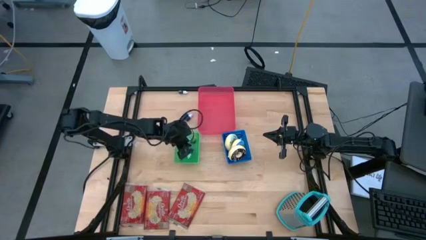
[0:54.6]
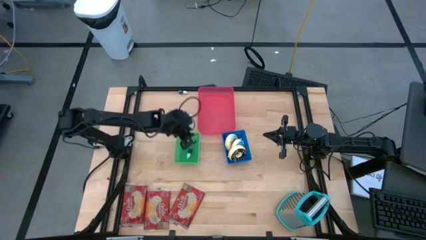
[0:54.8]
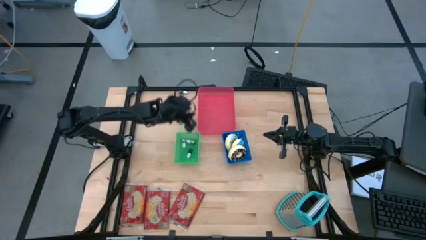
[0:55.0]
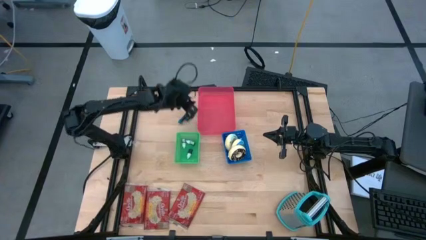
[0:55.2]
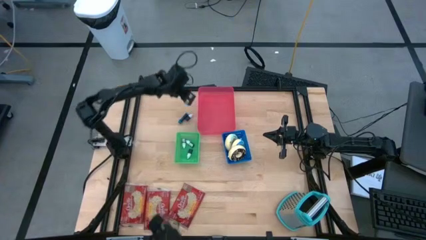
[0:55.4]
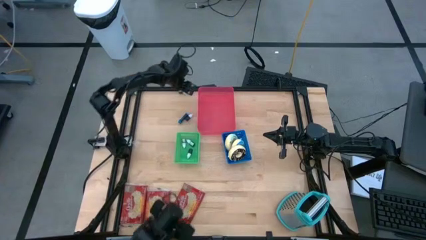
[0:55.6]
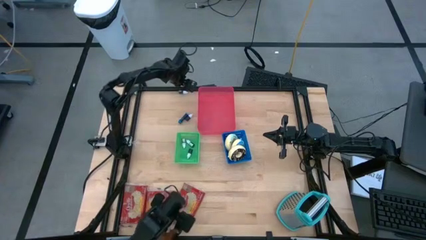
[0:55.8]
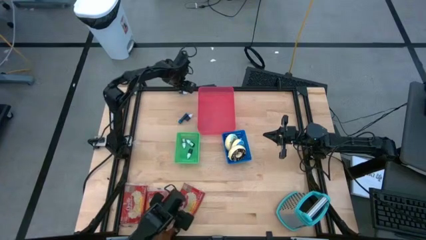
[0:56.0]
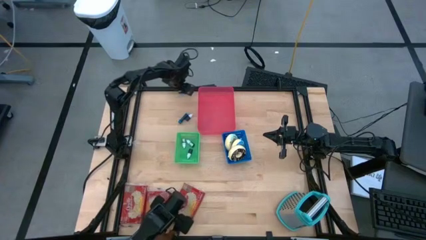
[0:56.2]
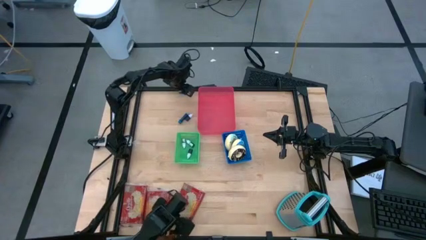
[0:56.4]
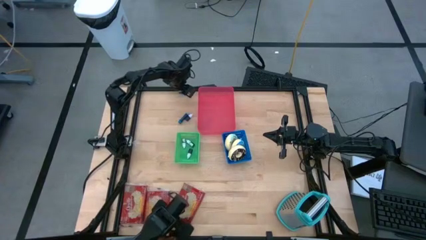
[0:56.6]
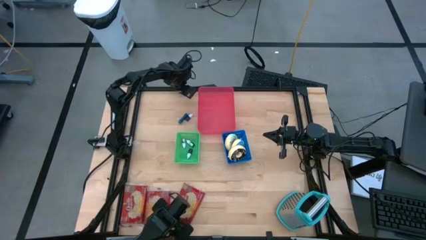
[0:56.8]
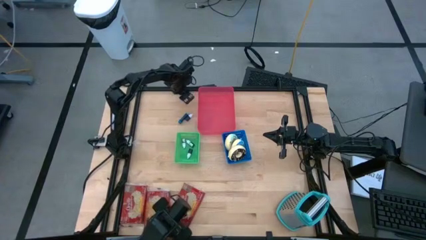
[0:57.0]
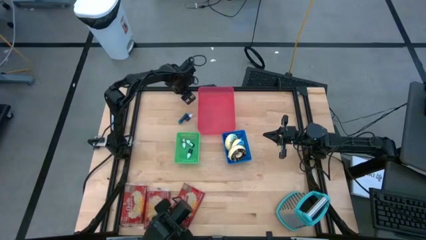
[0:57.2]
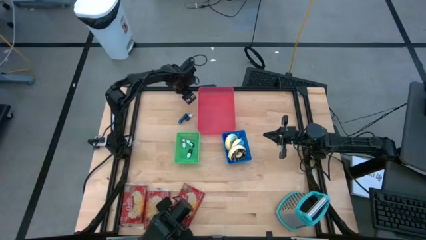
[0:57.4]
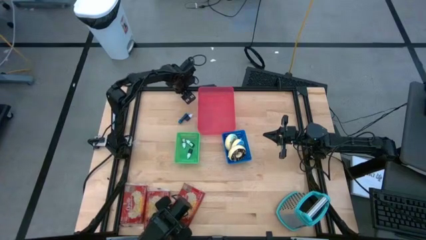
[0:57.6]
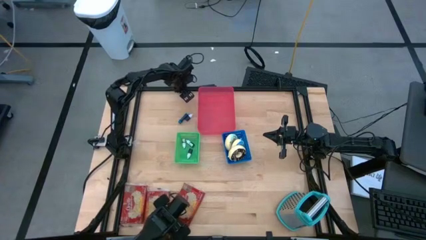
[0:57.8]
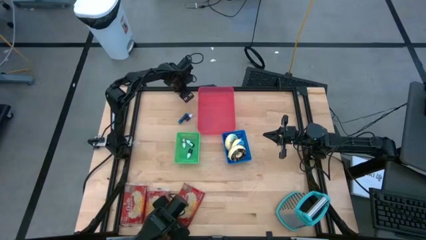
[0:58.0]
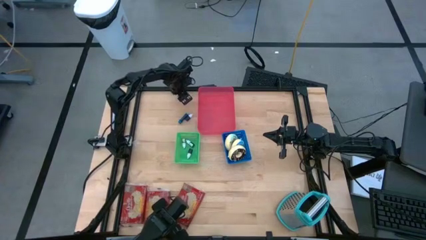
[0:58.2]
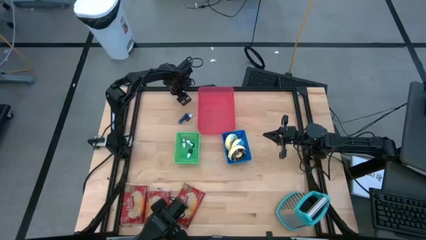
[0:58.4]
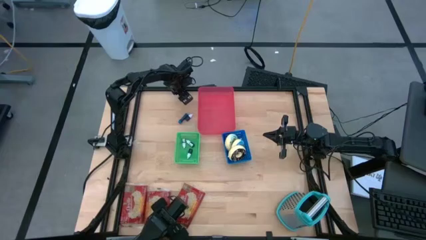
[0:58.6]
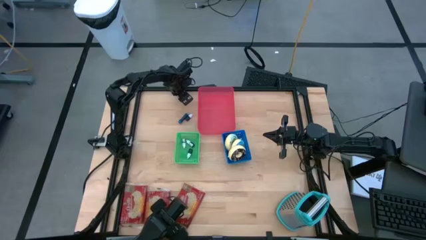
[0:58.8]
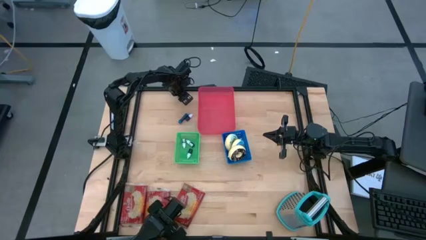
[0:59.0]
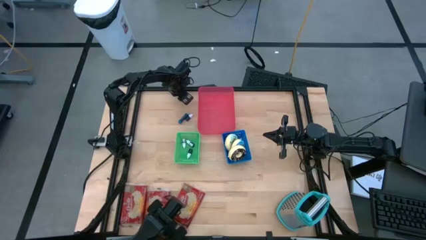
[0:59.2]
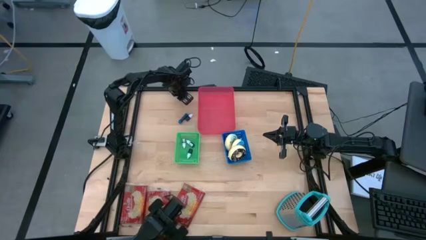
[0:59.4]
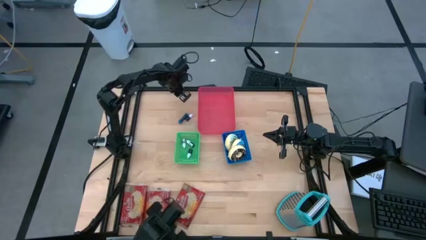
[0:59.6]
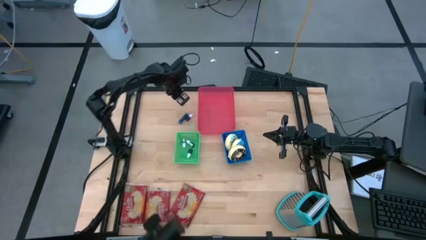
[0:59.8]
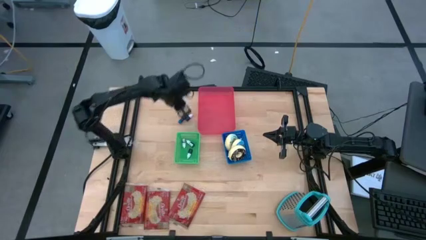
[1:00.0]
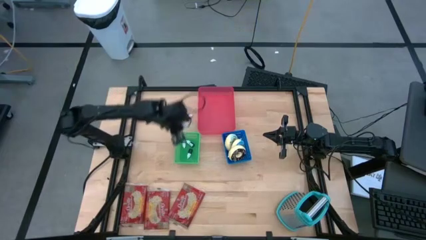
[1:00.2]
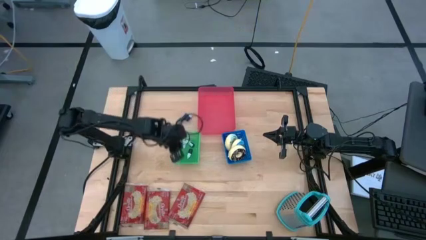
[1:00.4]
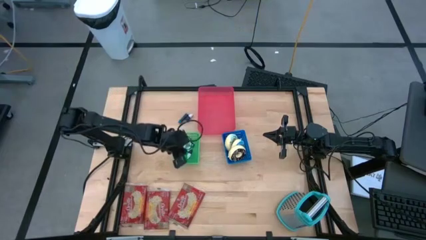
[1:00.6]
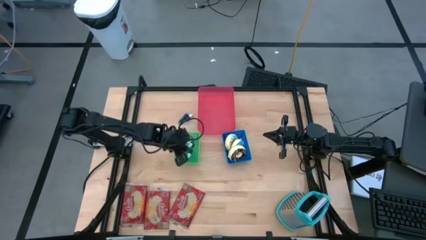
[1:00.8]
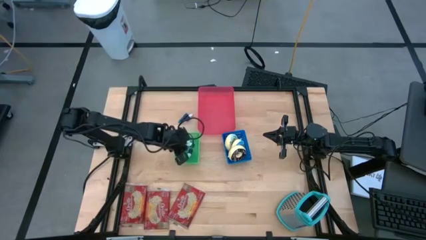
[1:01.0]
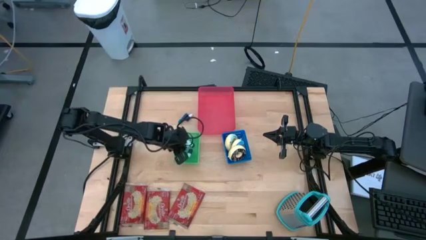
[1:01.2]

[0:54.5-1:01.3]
Put the black food coloring bottle into the green bin

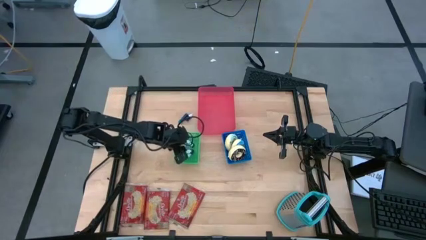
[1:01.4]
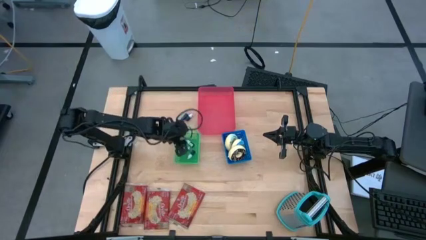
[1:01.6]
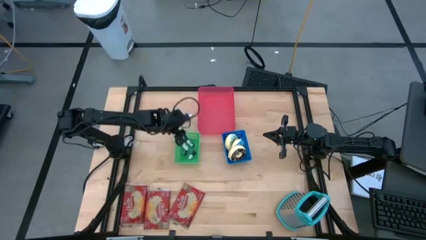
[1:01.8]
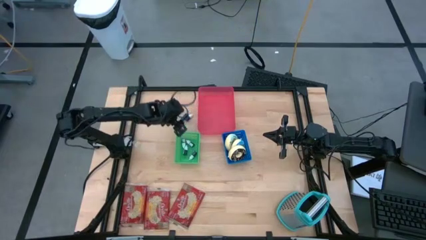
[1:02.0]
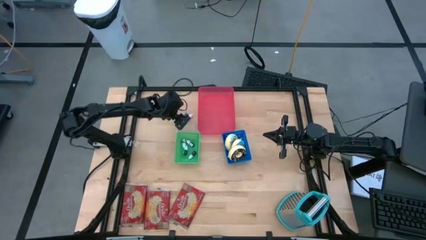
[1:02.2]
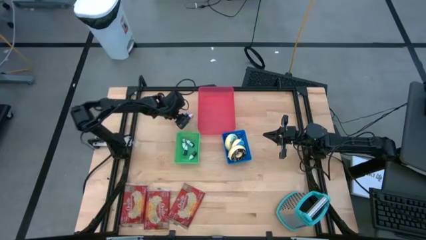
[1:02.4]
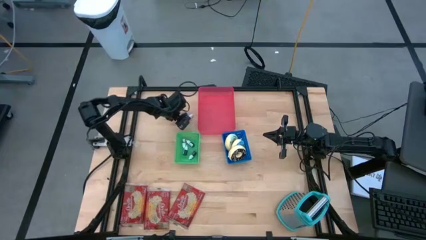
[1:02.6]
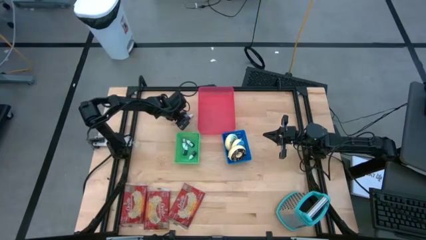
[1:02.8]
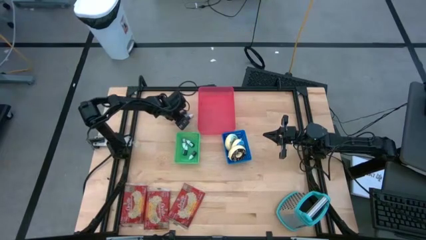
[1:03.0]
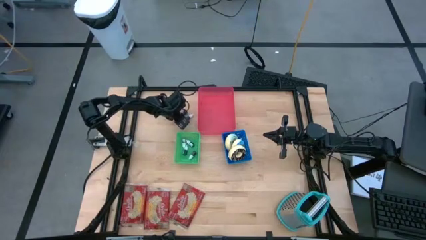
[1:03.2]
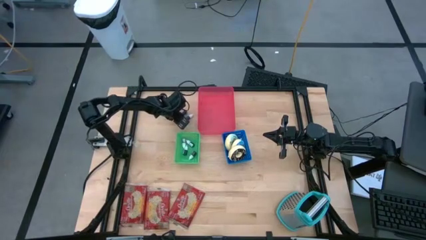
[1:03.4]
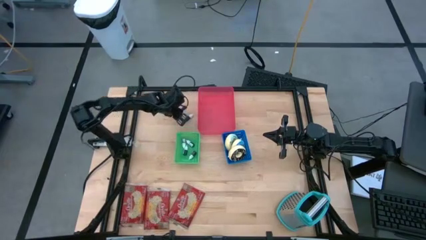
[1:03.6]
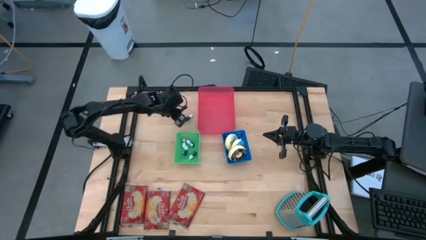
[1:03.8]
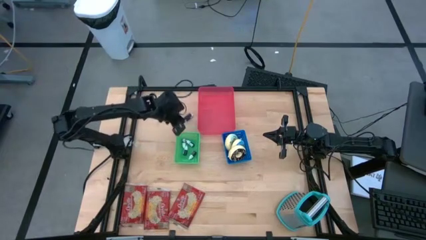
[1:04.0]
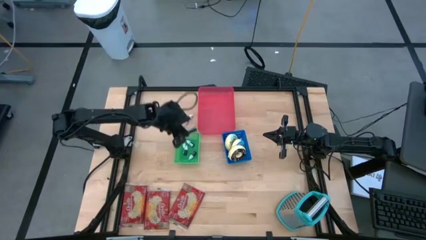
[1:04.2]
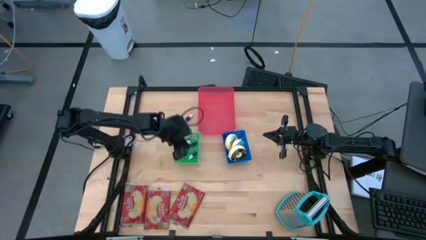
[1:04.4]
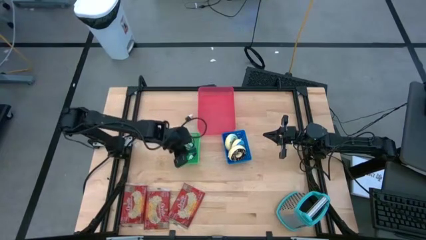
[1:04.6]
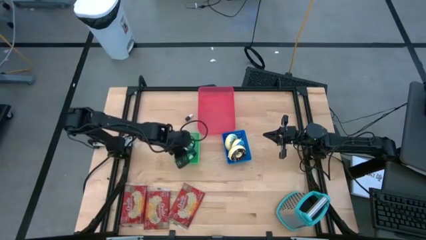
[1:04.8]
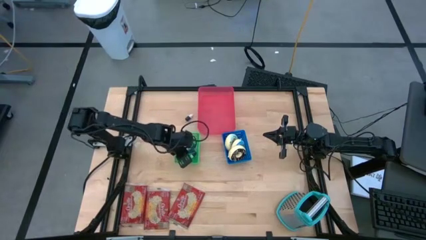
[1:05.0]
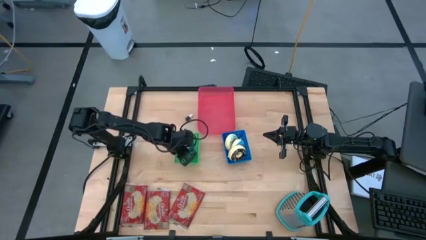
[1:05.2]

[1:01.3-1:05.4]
Put the blue food coloring bottle into the green bin

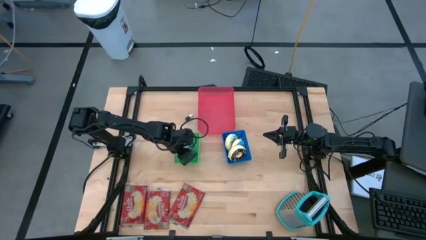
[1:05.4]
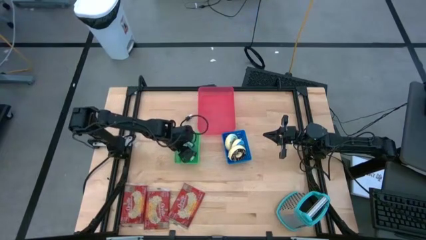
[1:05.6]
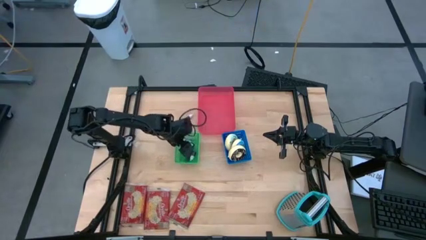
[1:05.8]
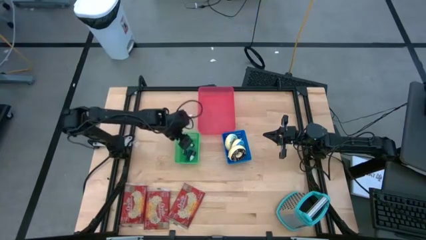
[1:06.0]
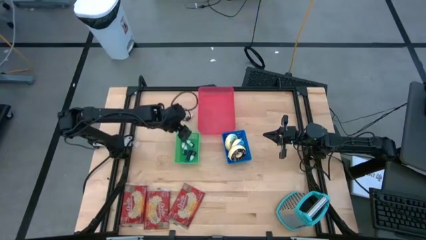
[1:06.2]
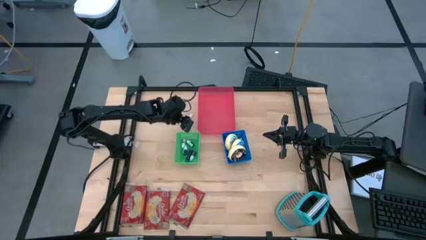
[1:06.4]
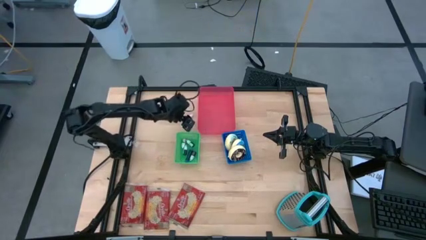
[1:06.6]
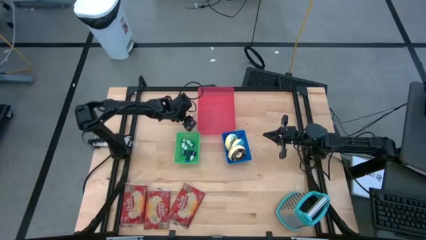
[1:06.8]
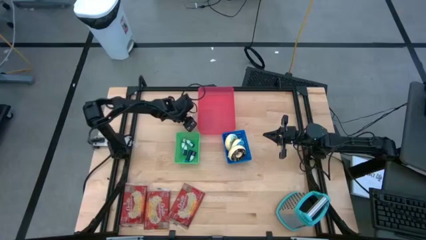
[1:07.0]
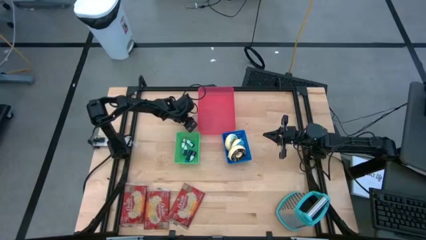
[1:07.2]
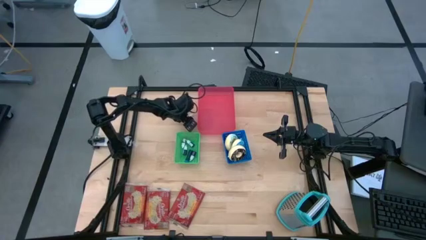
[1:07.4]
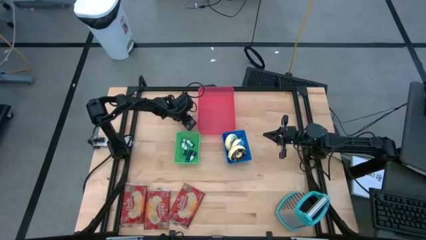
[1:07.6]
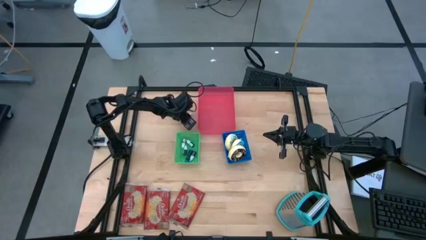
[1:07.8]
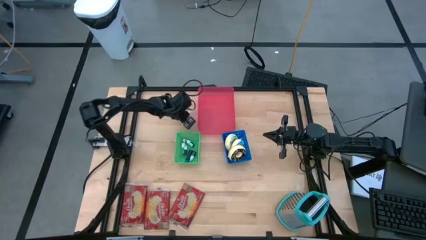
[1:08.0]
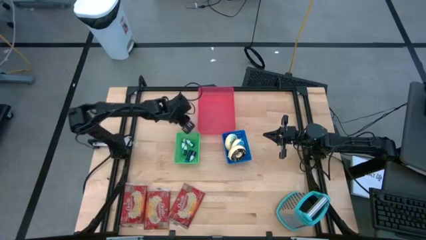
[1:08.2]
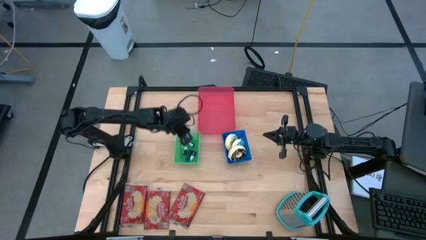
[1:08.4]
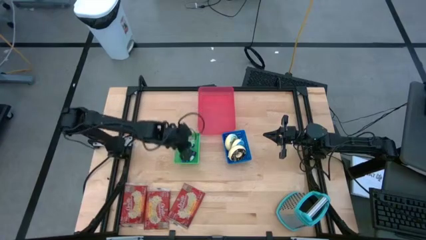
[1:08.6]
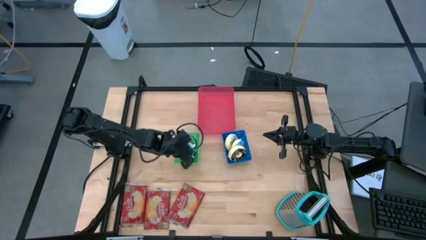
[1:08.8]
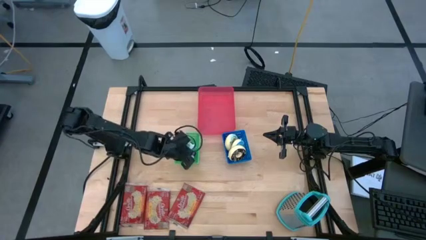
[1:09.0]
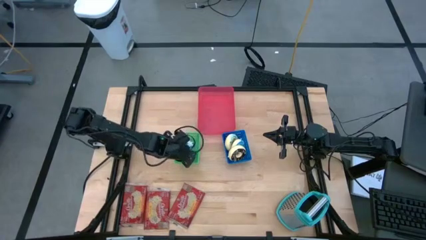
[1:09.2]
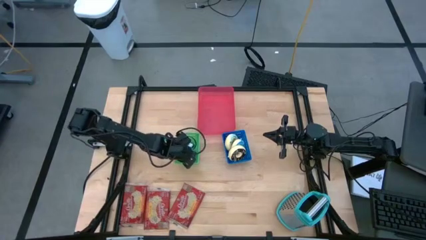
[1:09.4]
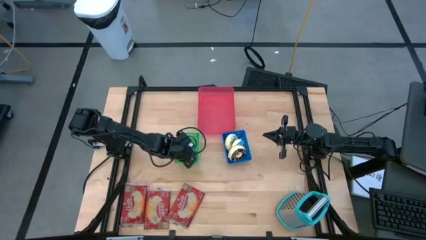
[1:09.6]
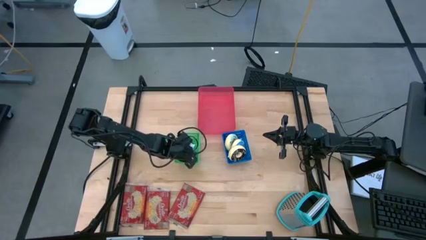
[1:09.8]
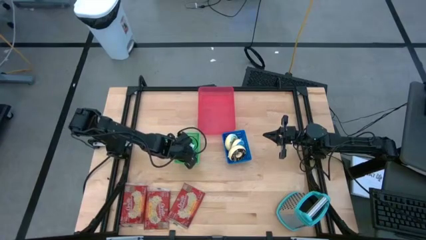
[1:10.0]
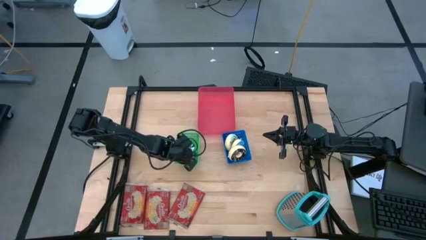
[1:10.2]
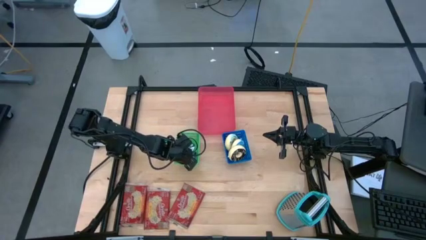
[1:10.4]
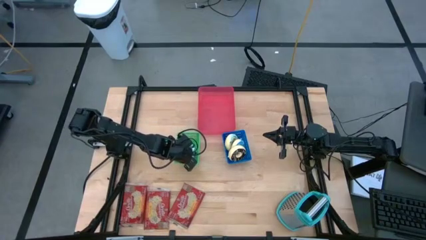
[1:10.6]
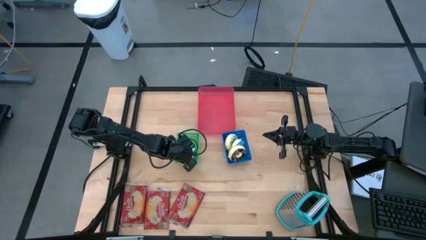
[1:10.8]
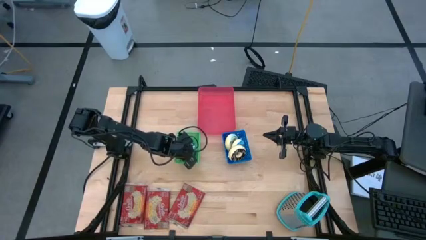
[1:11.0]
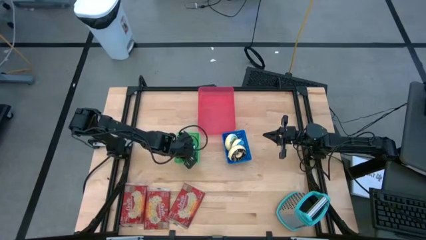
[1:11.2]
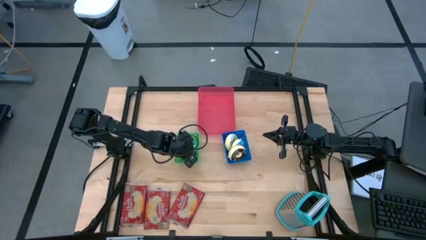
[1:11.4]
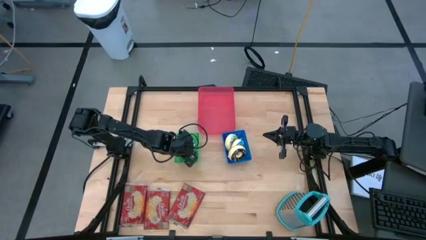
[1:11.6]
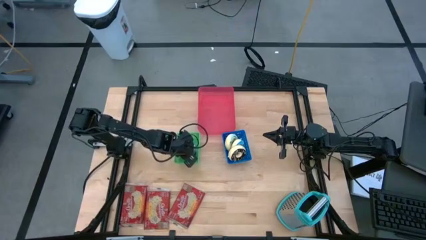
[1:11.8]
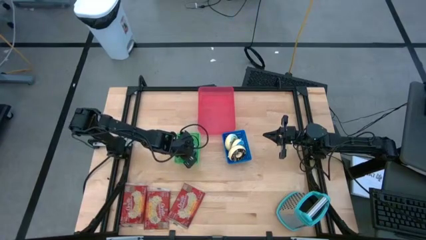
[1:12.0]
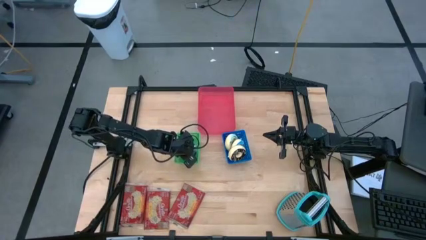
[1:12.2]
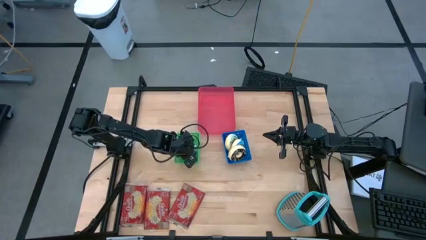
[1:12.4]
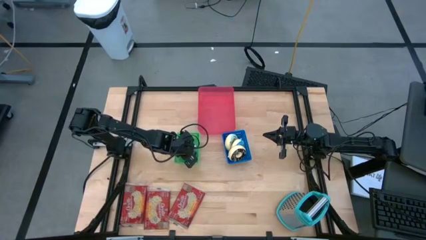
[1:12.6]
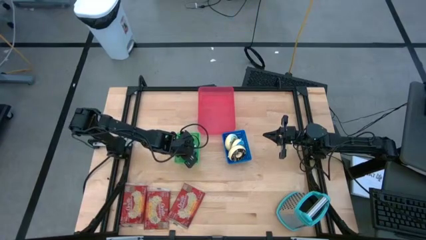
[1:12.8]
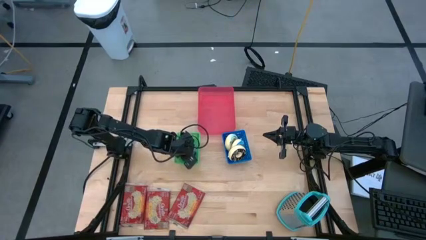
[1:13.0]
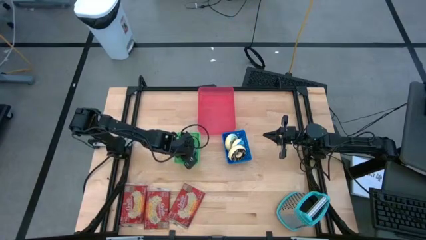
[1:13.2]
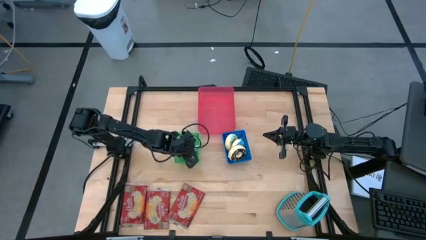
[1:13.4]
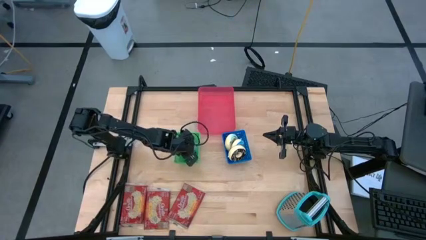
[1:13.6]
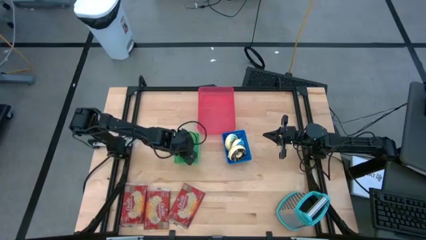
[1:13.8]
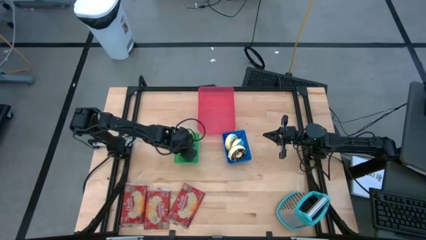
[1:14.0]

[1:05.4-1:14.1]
Put the black food coloring bottle into the green bin
